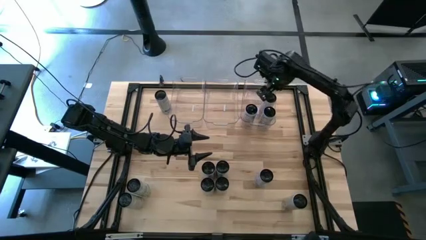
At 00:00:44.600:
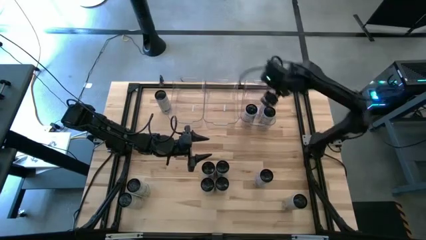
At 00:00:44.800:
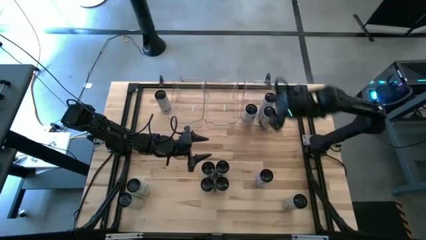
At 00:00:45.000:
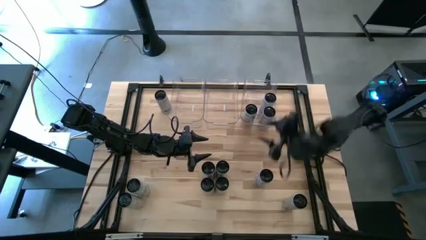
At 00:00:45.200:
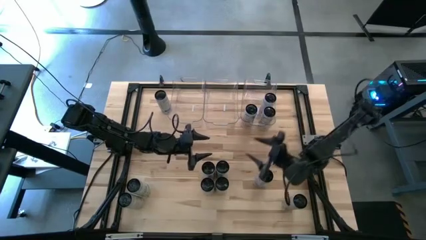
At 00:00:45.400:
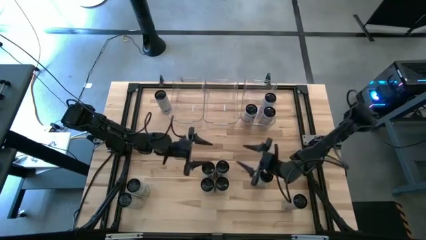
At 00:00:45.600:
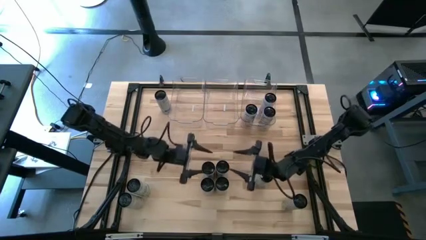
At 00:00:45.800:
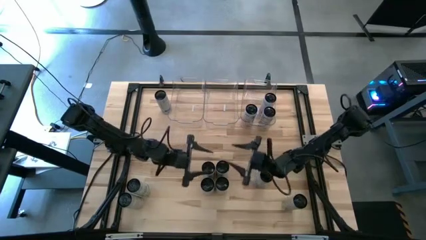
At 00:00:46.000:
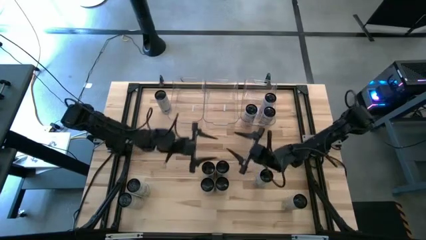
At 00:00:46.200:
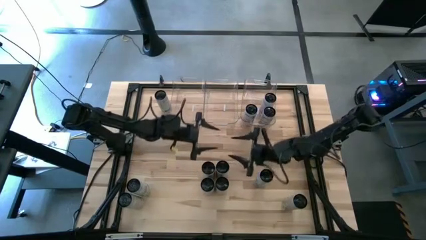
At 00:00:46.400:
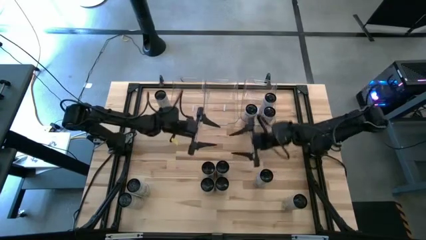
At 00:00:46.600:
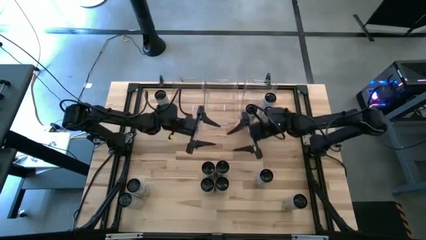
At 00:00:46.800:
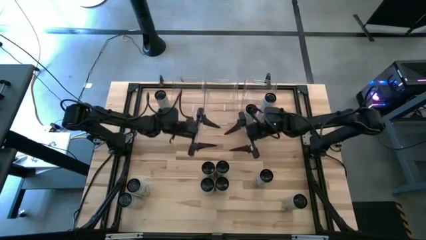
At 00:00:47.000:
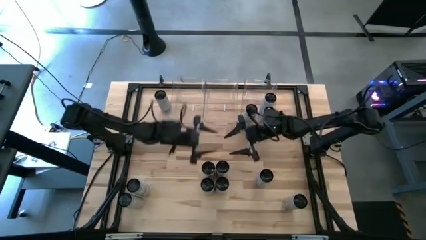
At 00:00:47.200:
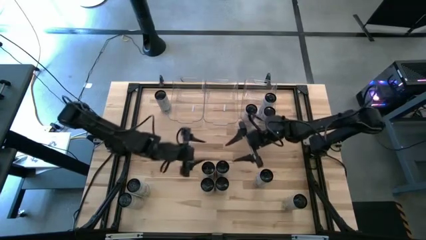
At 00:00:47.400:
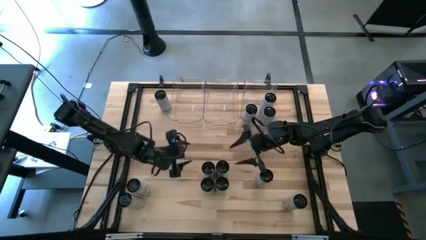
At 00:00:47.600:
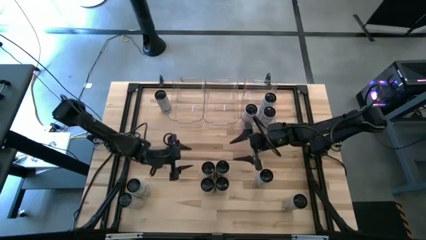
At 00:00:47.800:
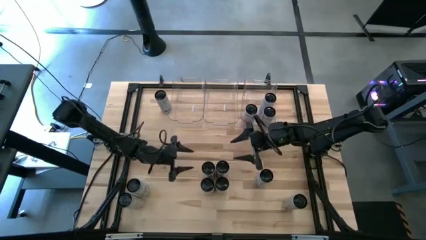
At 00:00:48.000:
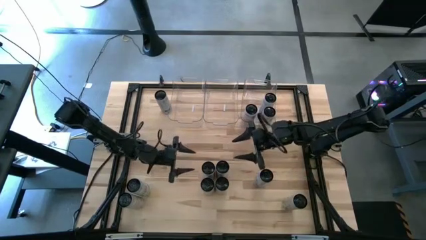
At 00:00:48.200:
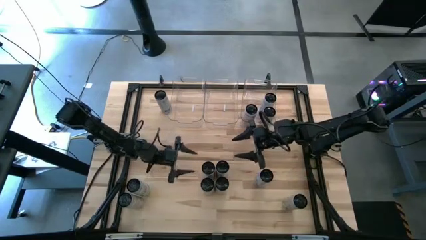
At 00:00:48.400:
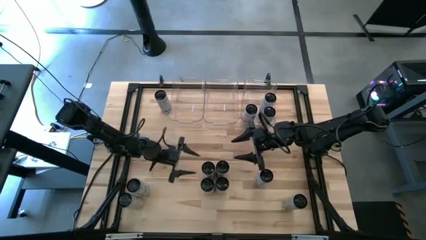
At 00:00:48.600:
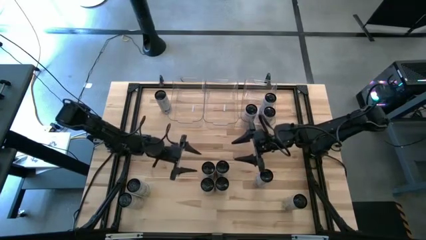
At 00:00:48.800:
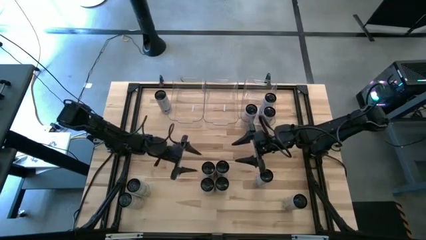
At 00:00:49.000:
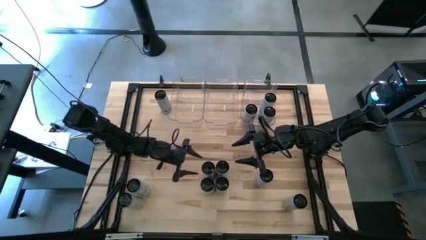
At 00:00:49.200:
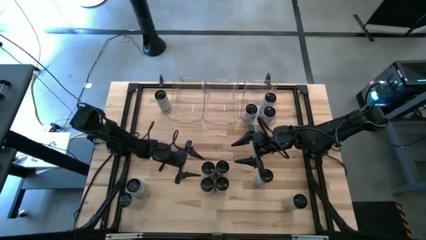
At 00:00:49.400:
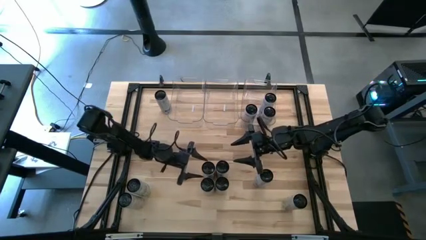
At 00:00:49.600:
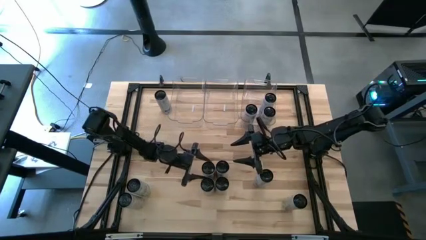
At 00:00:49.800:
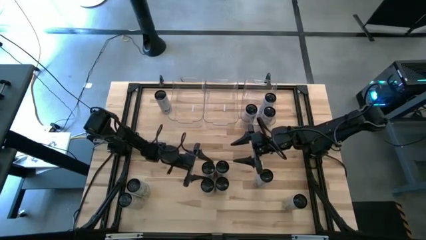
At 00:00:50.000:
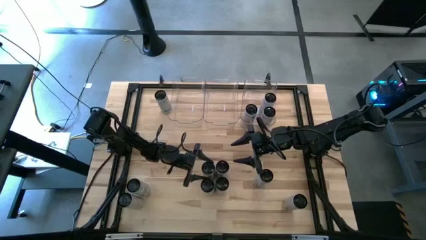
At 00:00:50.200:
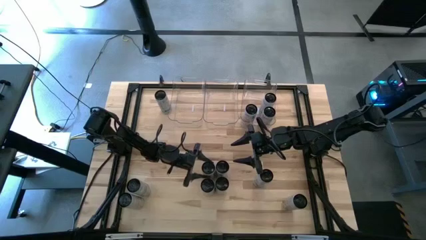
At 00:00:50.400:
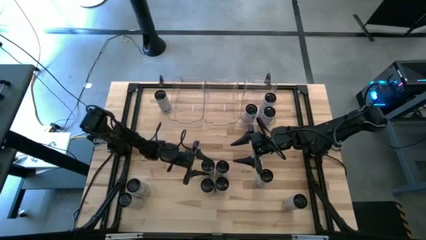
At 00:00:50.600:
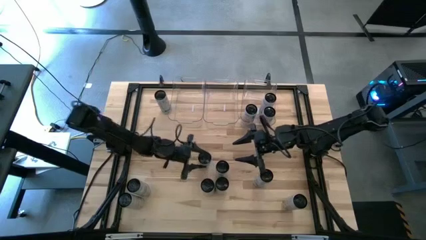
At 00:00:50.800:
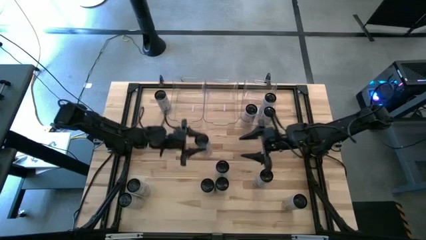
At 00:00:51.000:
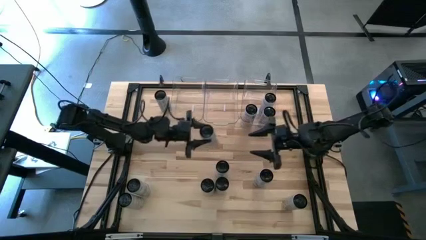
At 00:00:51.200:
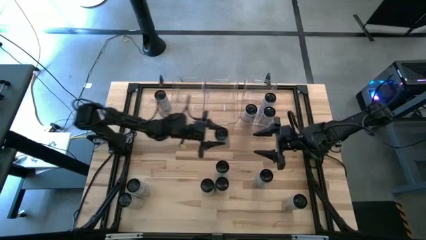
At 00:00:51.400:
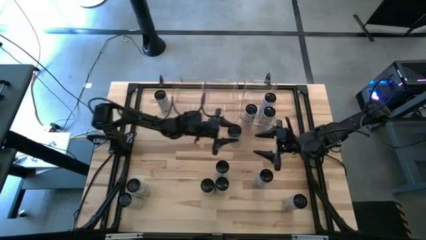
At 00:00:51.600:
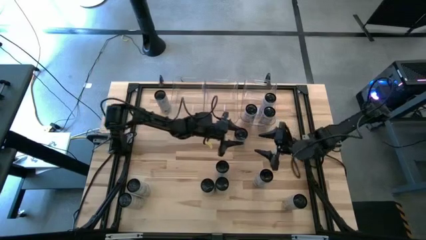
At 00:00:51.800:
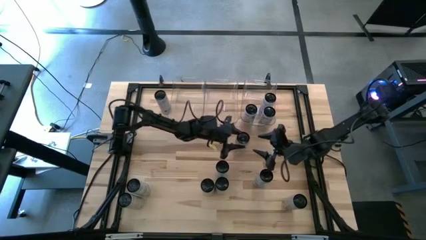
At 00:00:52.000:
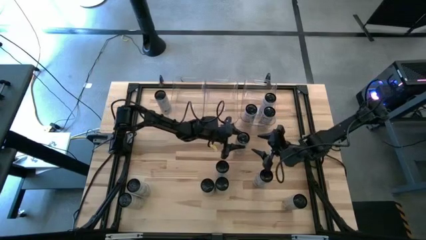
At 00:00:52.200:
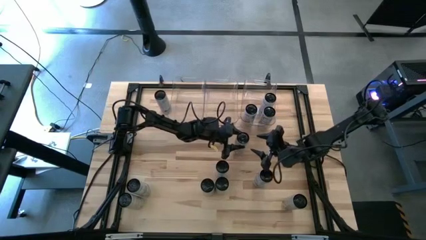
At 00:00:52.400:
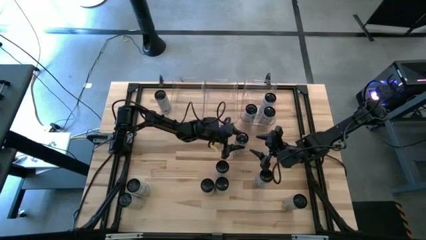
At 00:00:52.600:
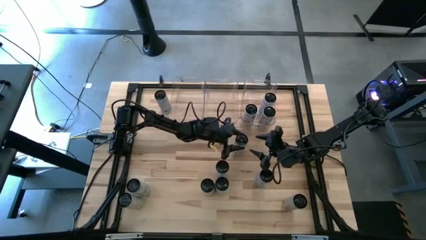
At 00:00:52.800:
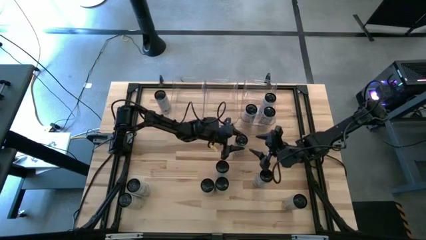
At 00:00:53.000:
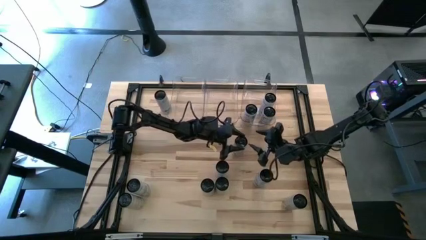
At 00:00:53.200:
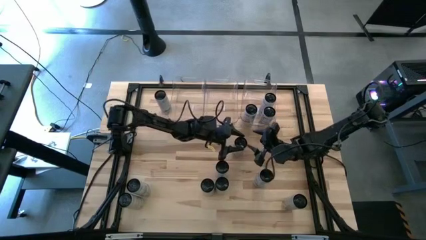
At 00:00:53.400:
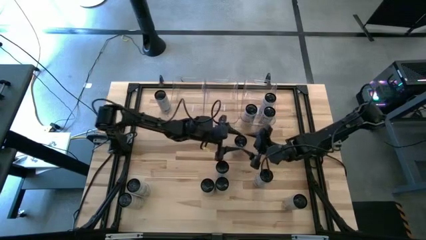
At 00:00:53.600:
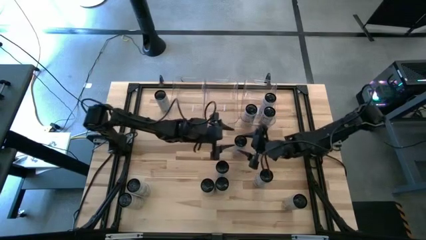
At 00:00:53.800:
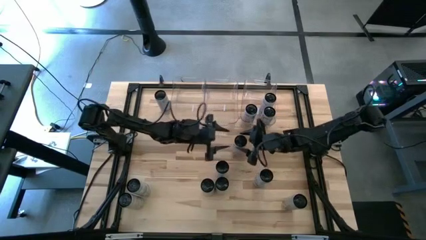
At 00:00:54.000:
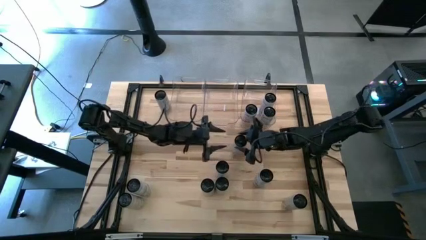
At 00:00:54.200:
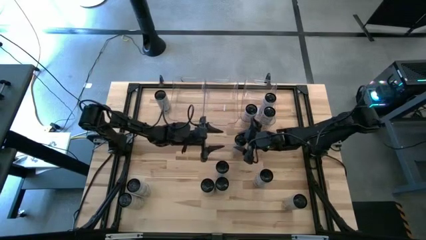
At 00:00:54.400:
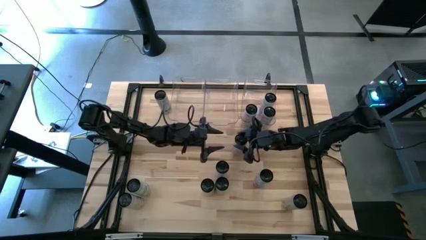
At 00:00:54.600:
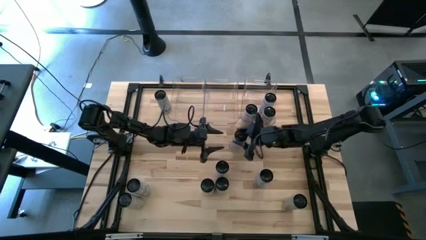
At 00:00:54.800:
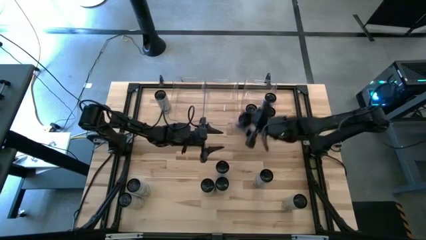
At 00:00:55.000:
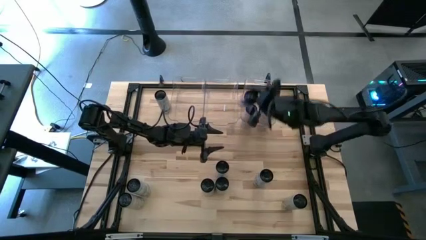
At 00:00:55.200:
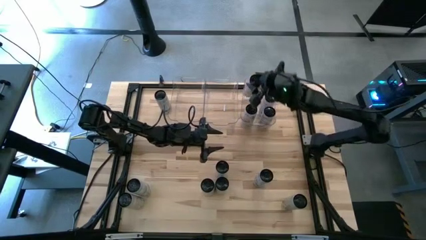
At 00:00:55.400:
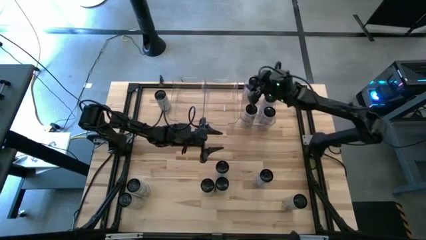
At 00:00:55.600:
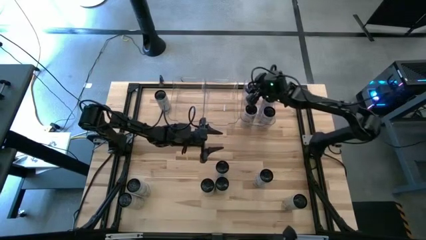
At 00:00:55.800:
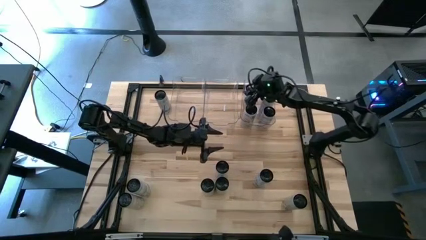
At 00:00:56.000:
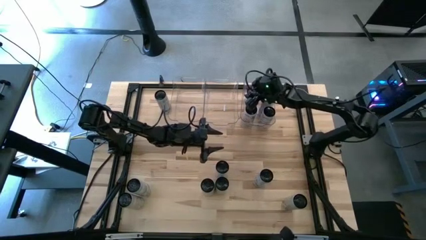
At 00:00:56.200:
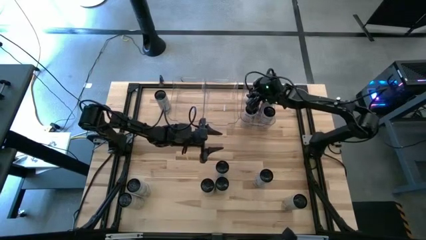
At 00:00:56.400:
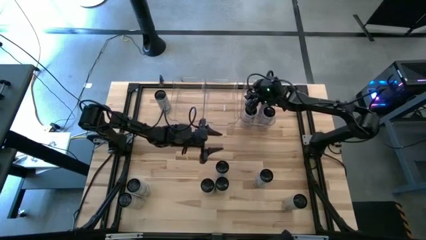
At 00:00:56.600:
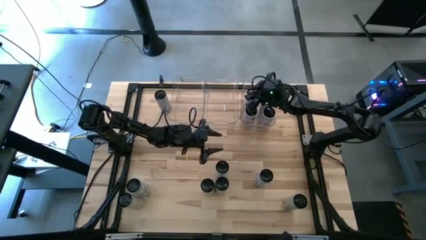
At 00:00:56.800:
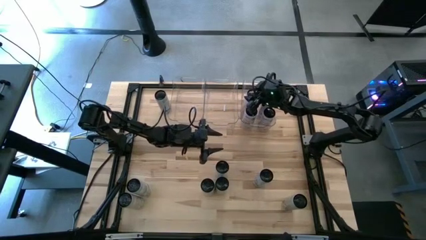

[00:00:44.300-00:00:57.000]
Task: Sort soda cans
Put the white-pink soda can into the right transparent bin
